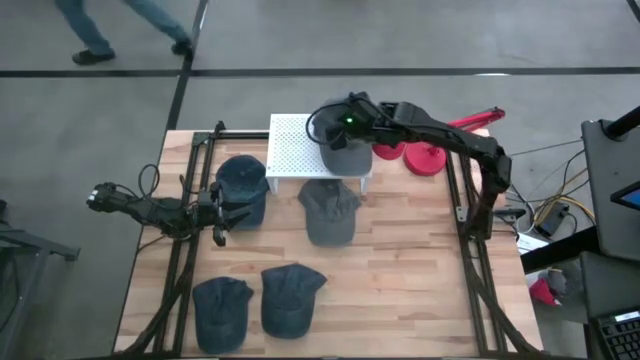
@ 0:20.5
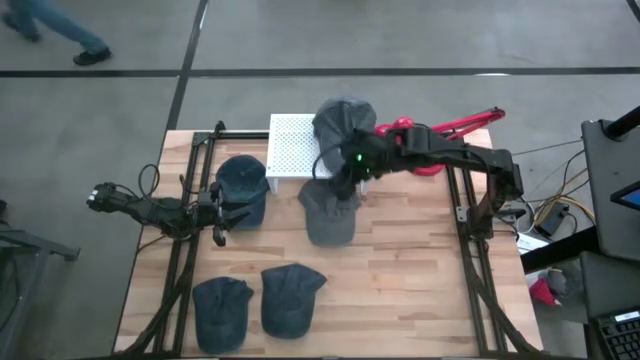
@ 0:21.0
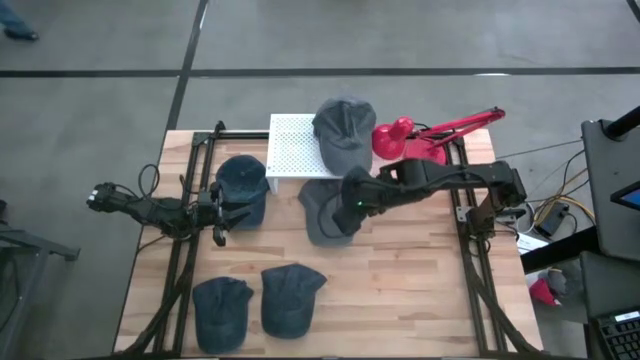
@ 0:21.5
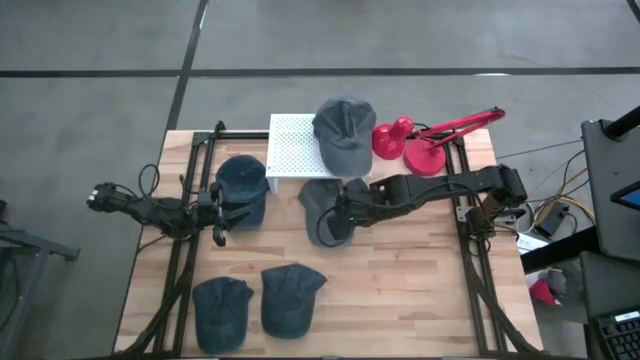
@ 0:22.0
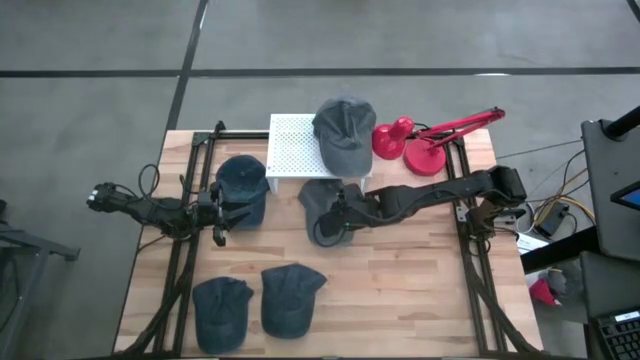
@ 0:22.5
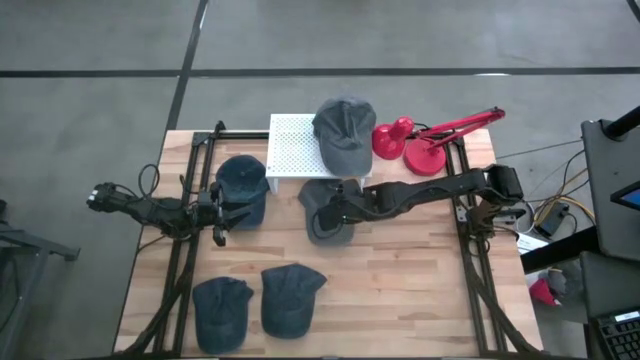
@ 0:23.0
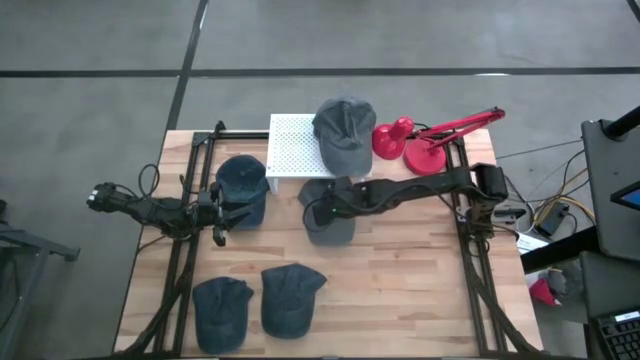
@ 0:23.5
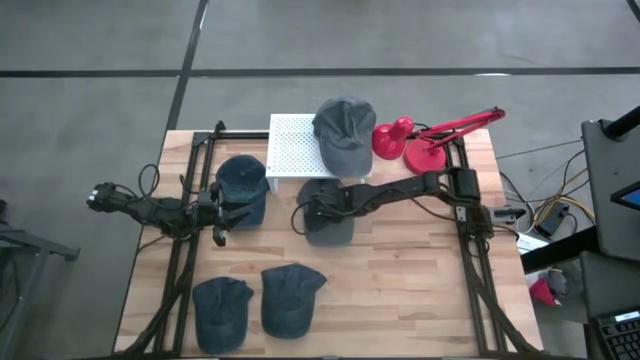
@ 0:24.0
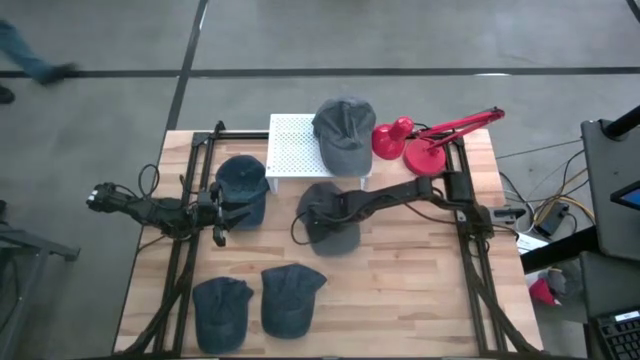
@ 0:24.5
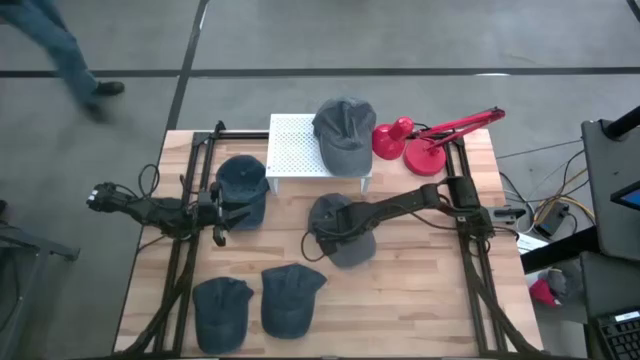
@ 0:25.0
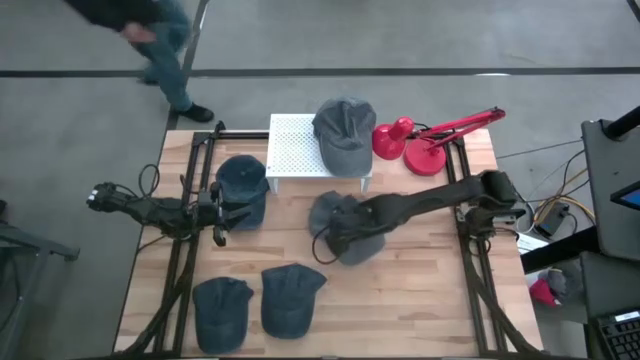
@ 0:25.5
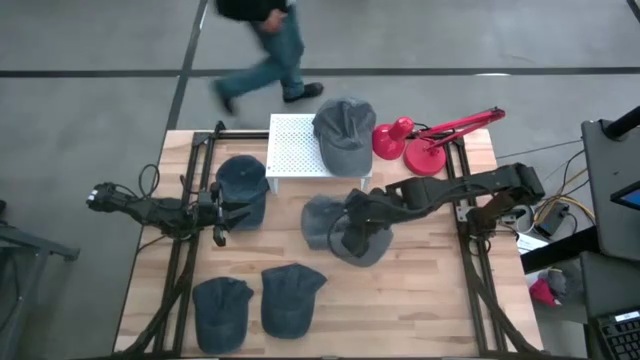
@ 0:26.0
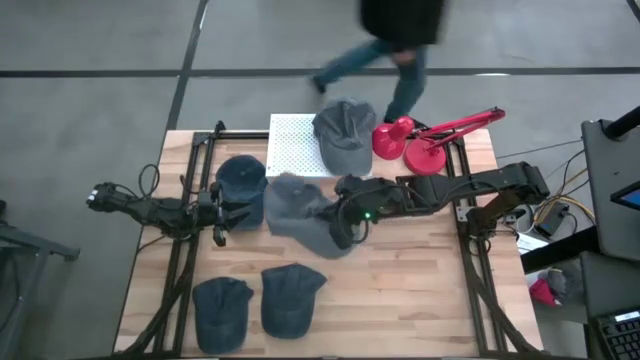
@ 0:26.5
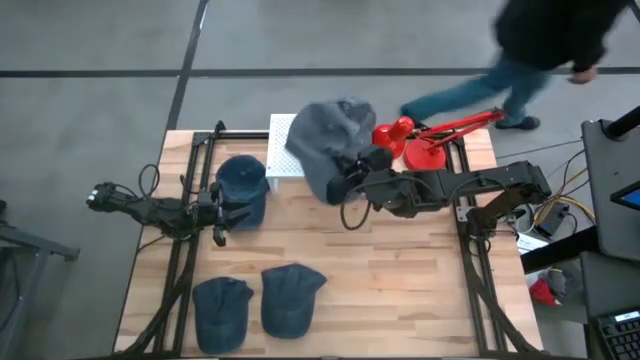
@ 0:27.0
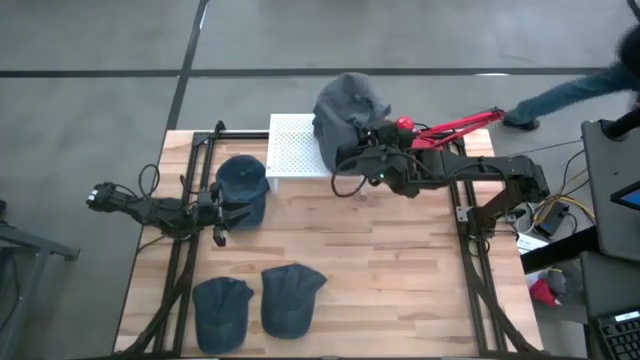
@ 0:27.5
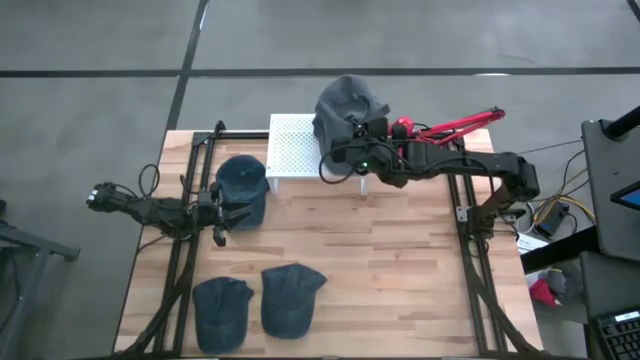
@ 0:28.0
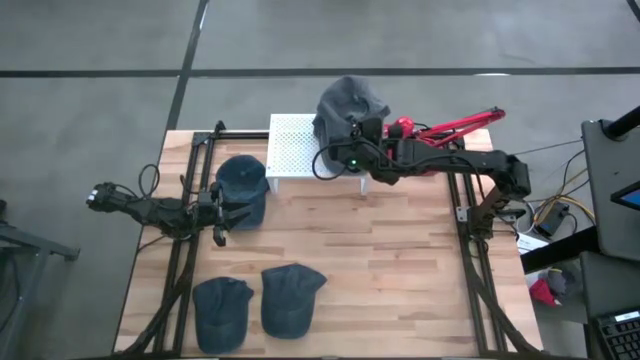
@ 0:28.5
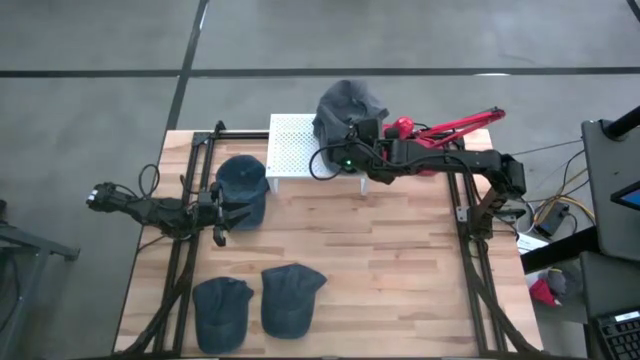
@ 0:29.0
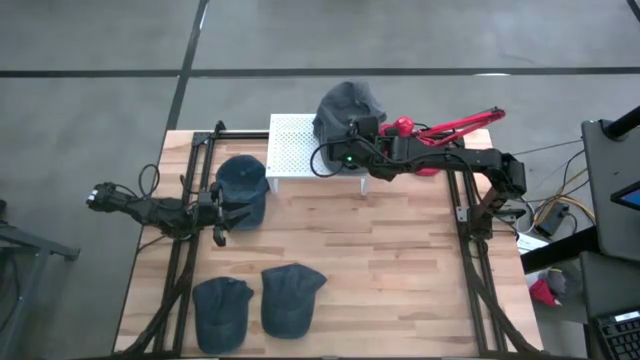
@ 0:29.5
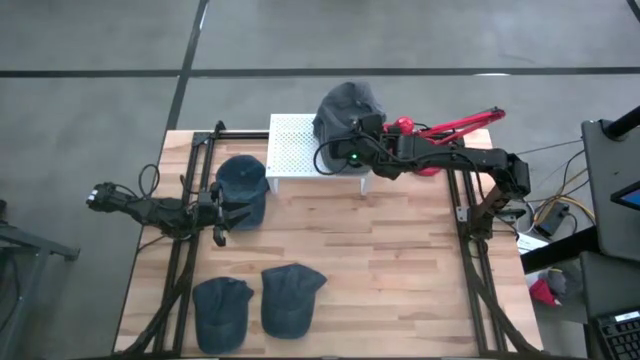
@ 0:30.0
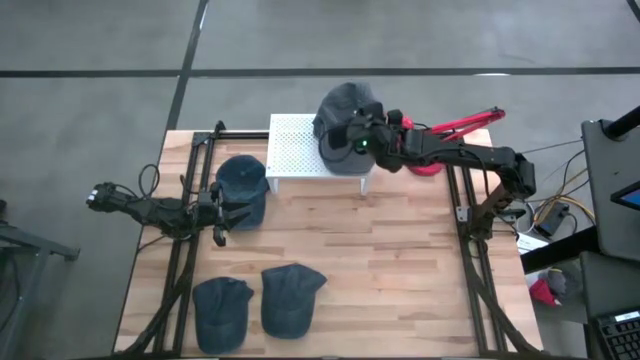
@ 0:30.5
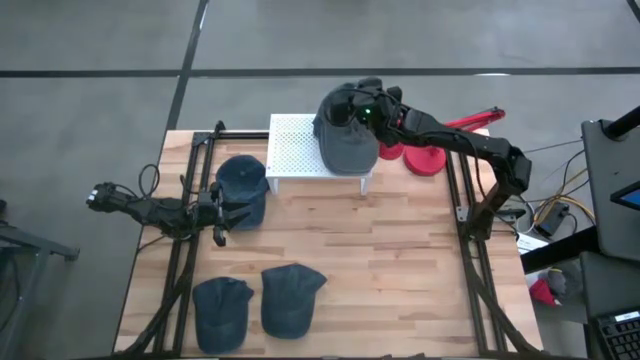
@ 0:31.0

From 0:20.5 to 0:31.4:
Task: Pick & Place hat
Stack the gray cap on top of the gray caps on the shelf

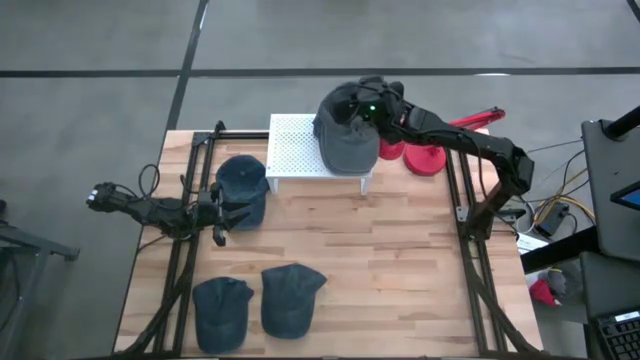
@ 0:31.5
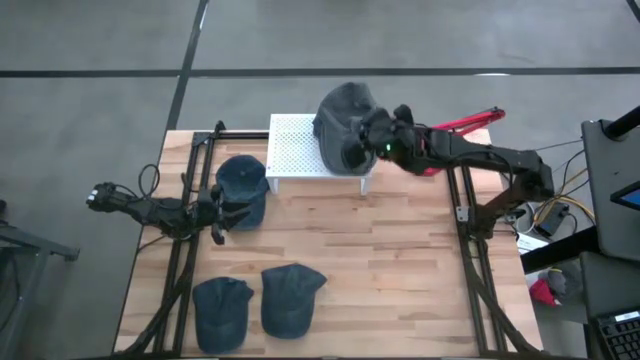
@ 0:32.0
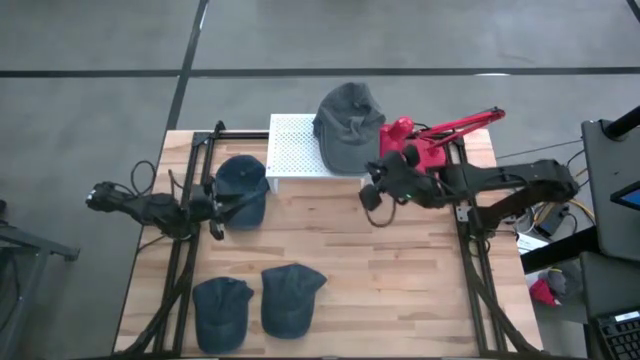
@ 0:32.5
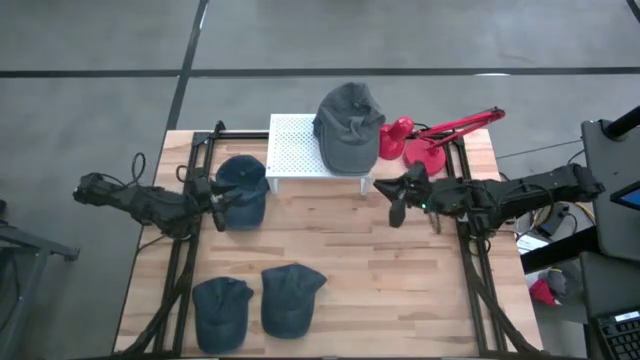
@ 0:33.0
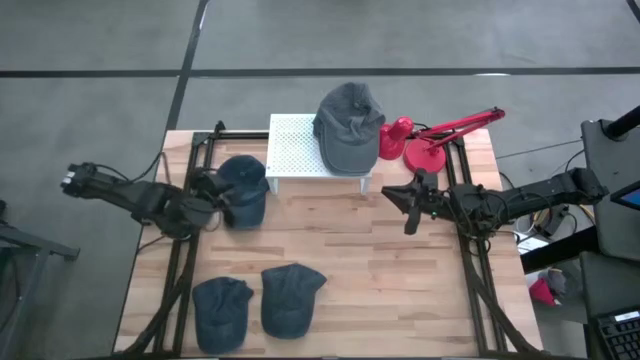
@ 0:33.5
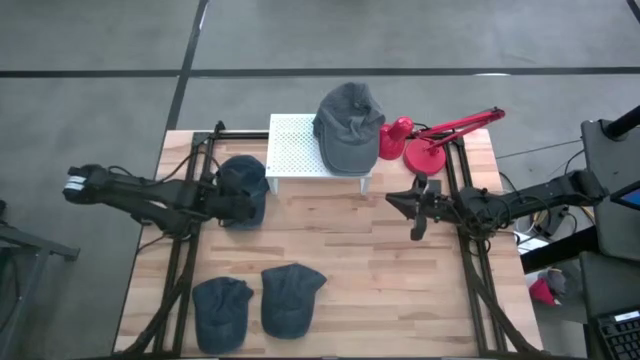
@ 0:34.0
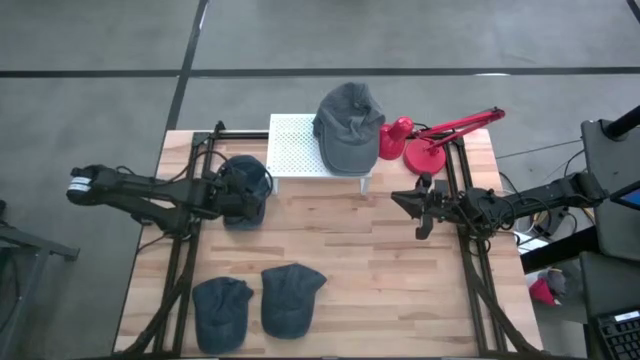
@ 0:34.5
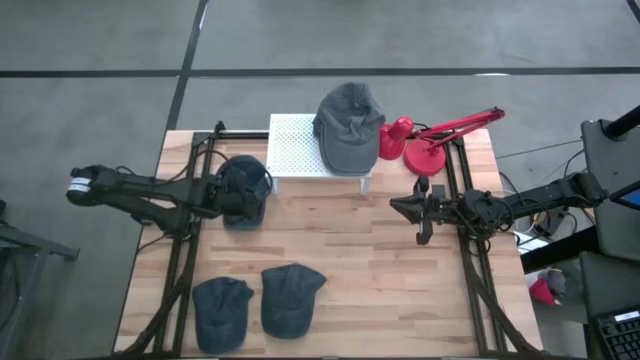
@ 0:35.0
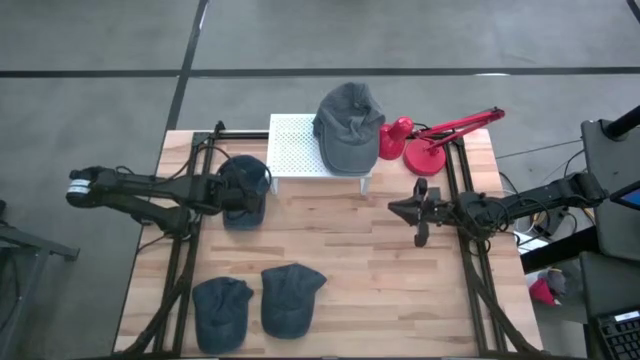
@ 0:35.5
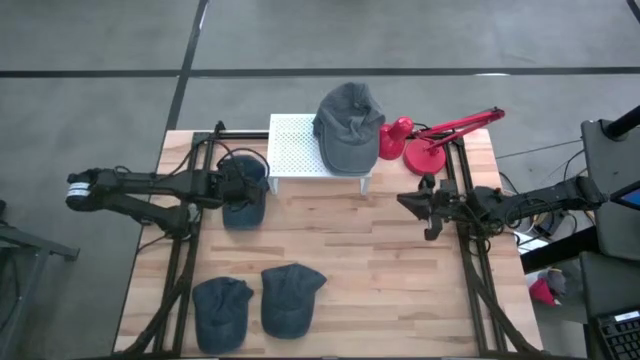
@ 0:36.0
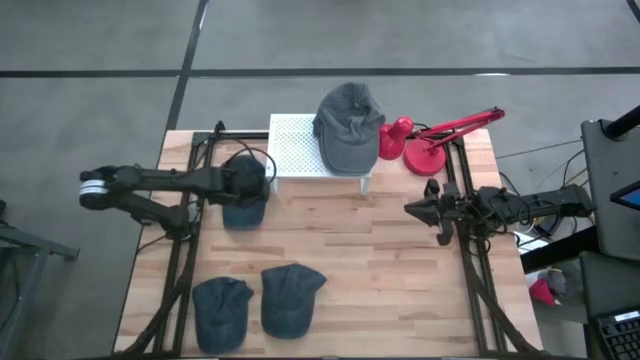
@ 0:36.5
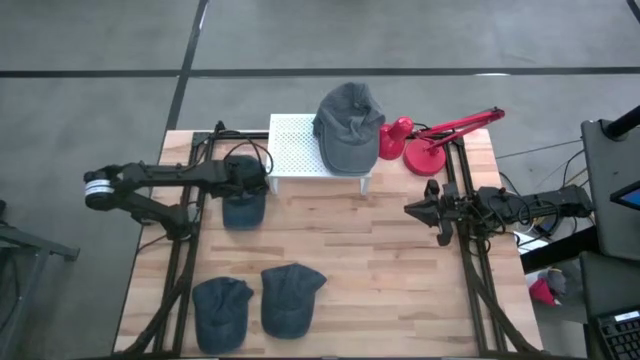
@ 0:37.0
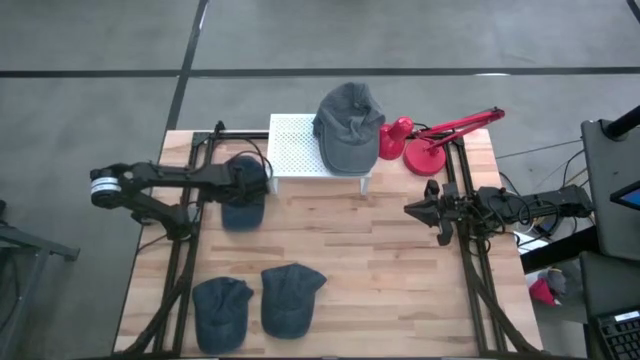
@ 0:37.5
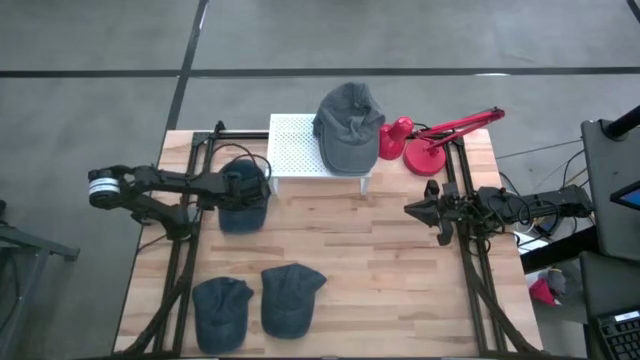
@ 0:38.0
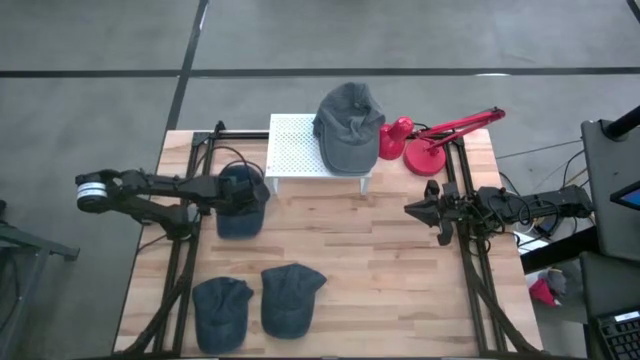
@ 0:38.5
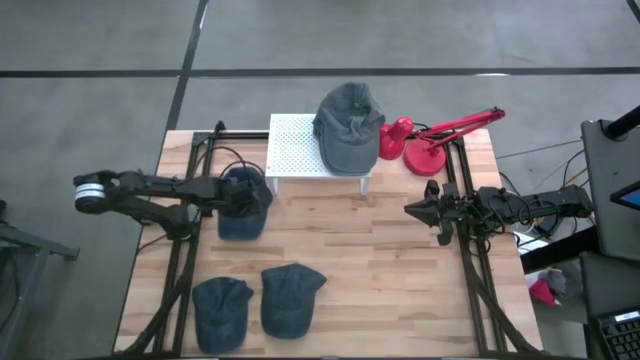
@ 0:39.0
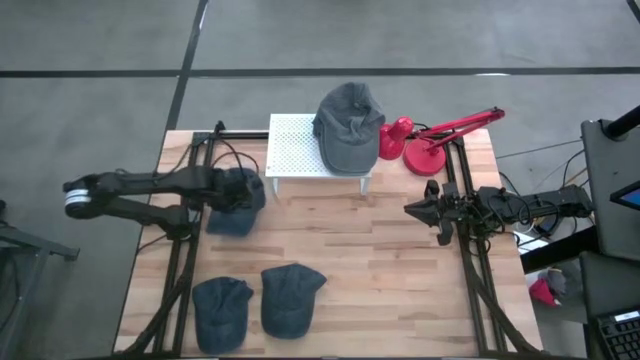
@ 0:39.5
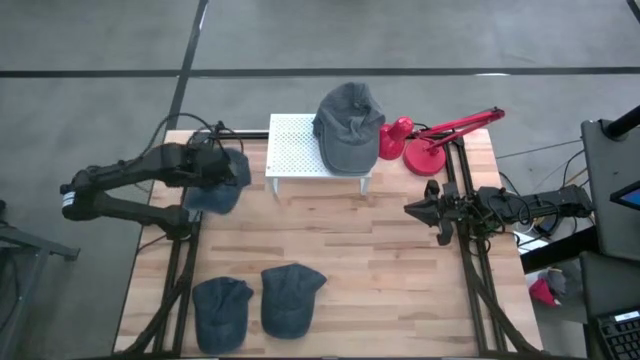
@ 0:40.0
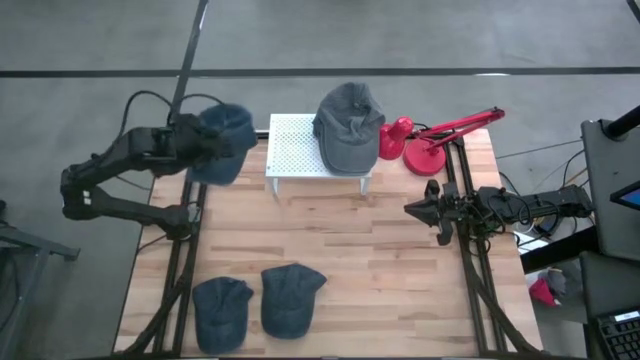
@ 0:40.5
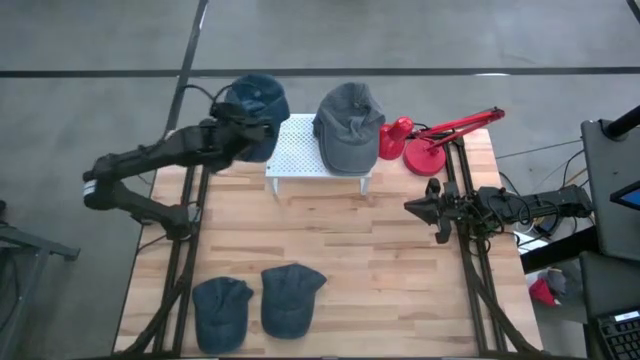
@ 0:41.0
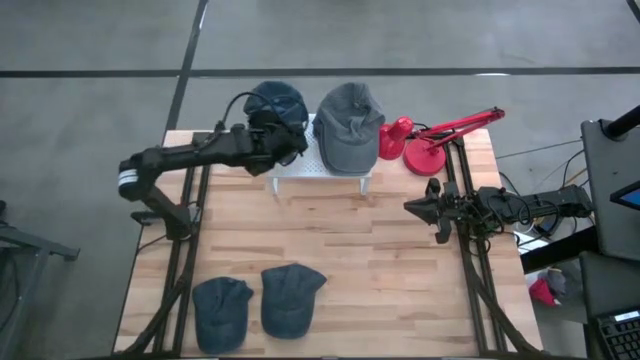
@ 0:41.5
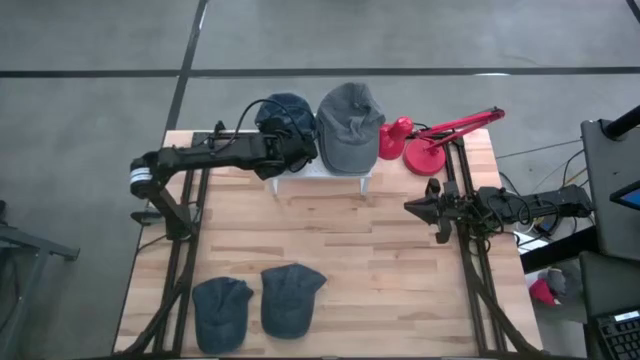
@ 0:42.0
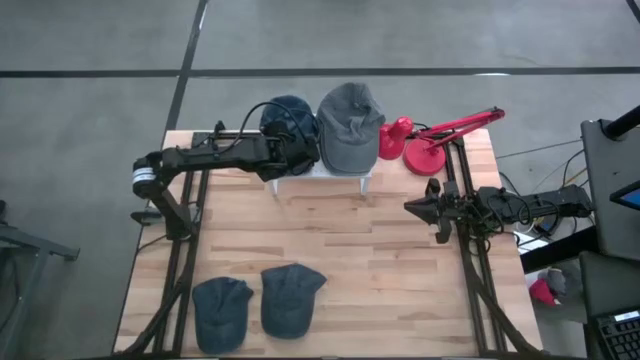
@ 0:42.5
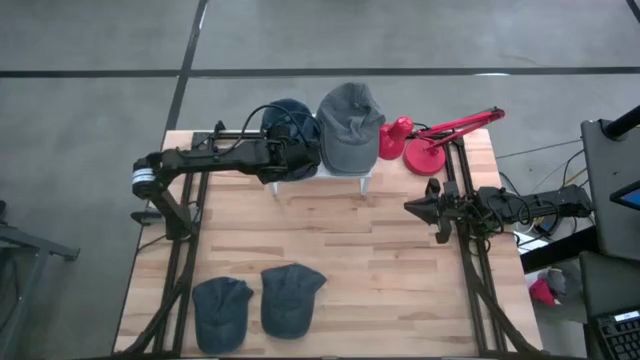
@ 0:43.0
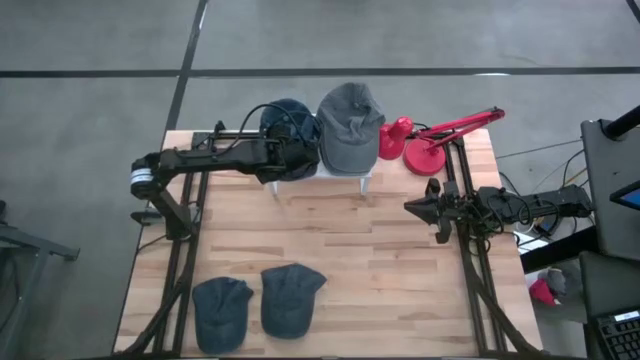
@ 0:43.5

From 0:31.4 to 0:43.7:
Put the top blue cap on the shelf
